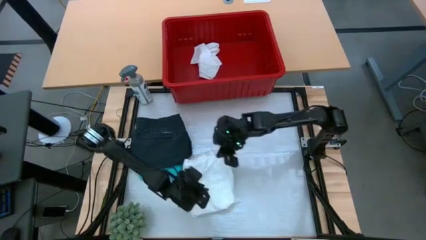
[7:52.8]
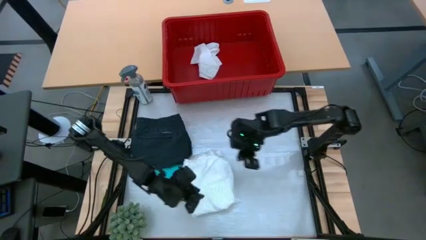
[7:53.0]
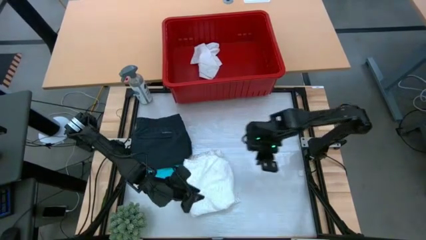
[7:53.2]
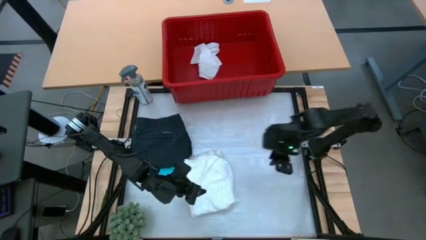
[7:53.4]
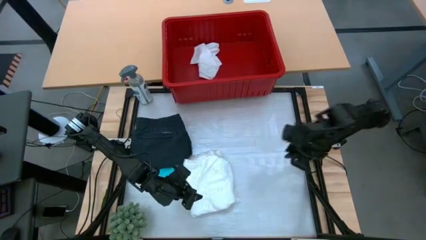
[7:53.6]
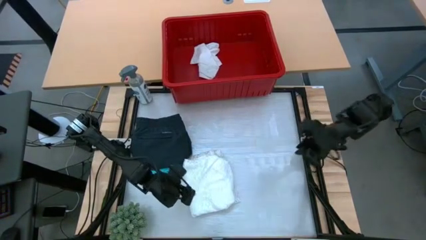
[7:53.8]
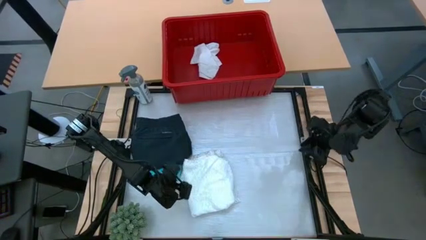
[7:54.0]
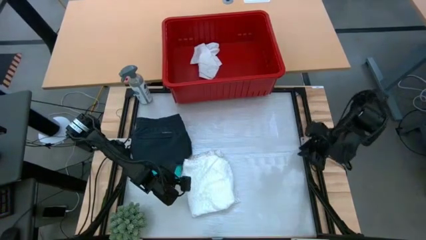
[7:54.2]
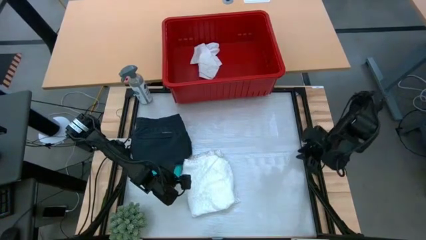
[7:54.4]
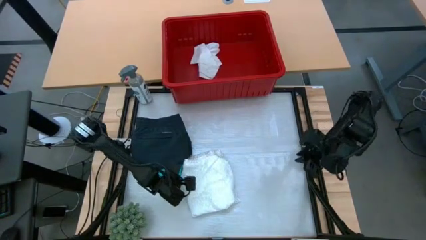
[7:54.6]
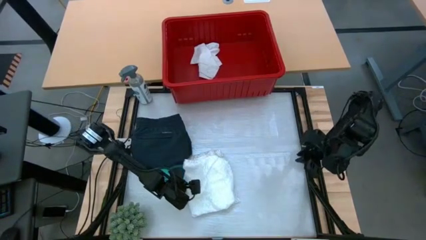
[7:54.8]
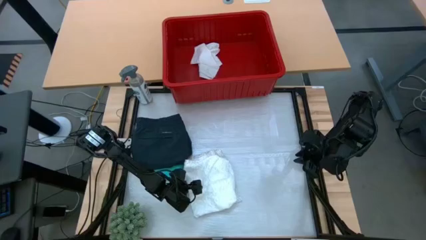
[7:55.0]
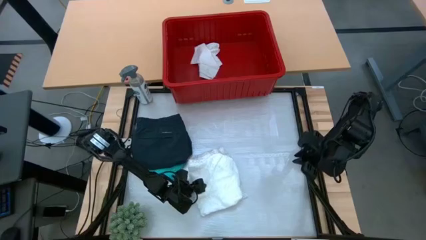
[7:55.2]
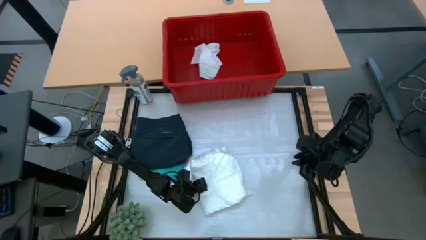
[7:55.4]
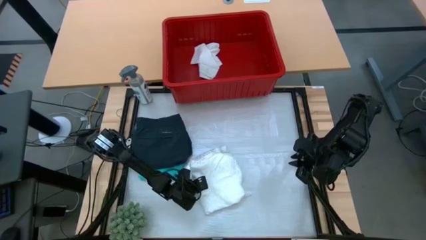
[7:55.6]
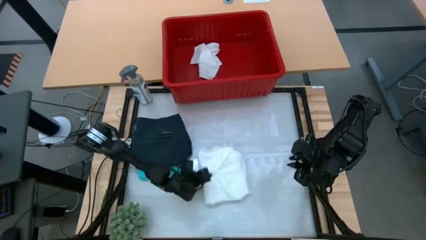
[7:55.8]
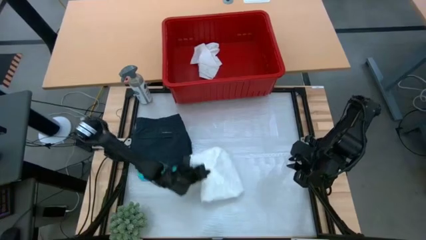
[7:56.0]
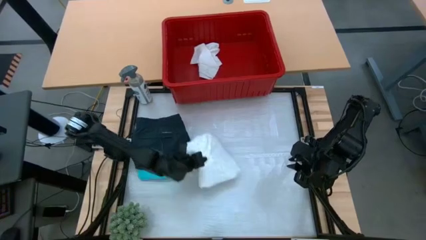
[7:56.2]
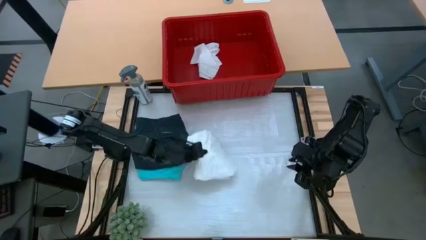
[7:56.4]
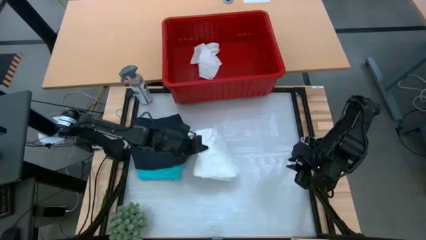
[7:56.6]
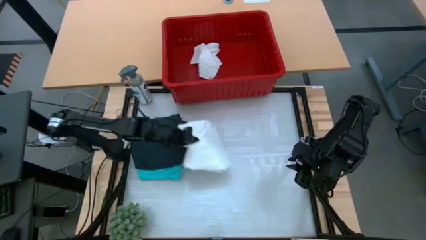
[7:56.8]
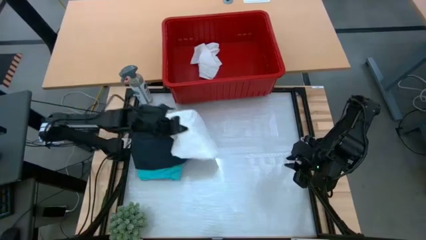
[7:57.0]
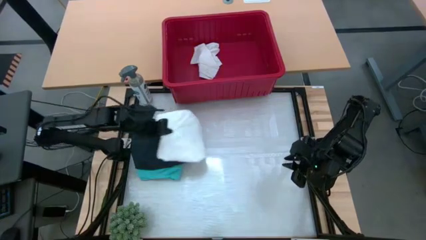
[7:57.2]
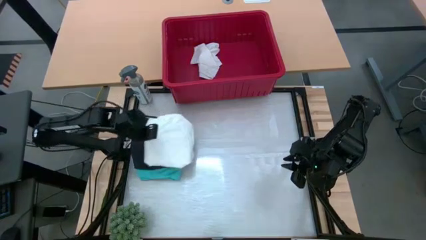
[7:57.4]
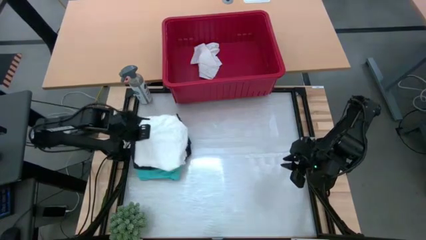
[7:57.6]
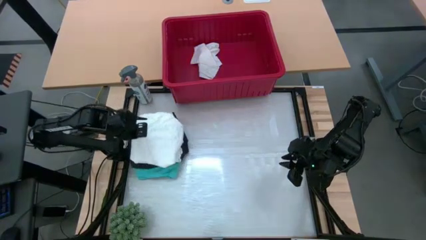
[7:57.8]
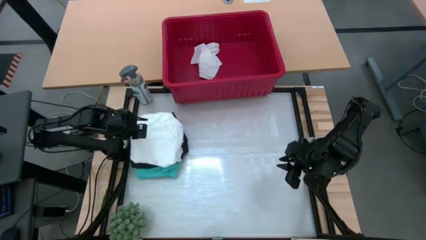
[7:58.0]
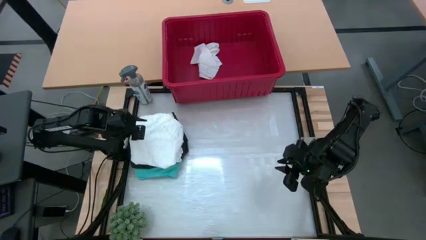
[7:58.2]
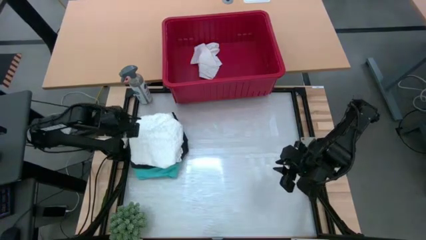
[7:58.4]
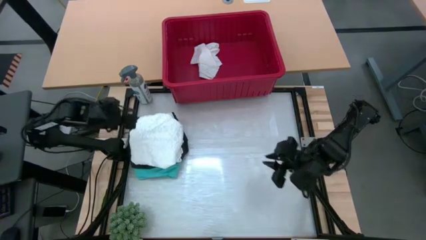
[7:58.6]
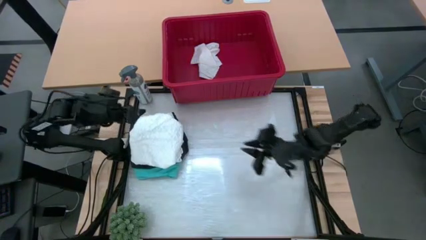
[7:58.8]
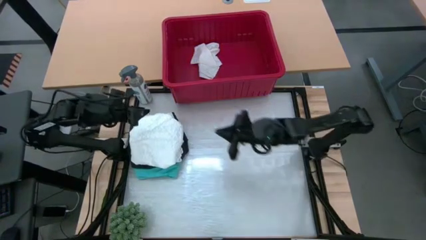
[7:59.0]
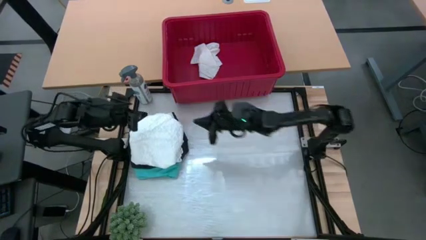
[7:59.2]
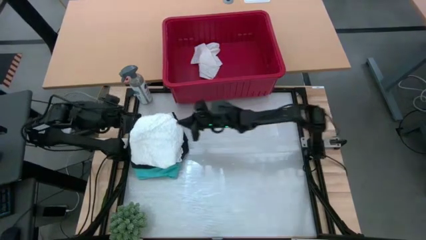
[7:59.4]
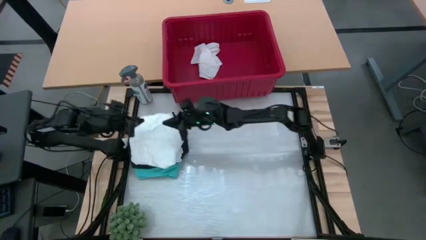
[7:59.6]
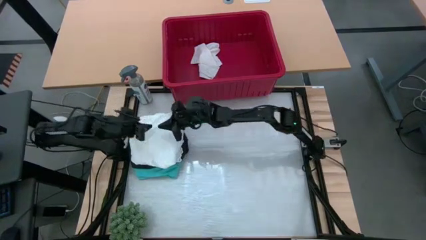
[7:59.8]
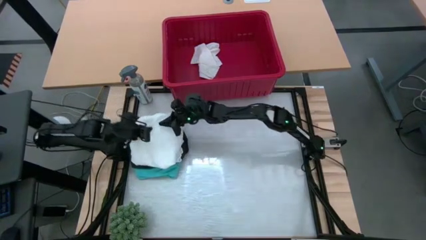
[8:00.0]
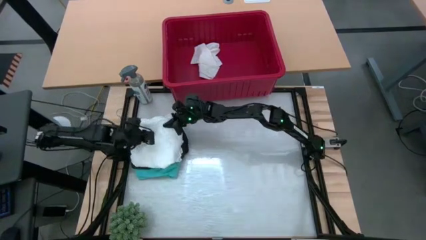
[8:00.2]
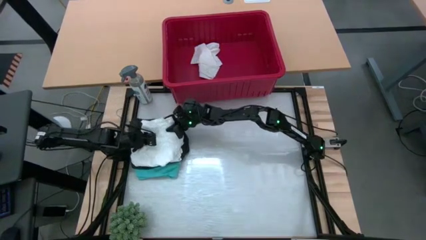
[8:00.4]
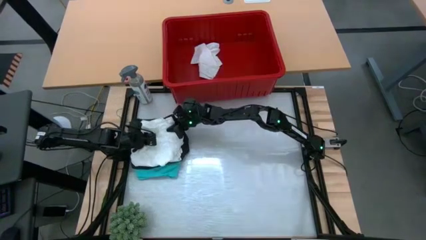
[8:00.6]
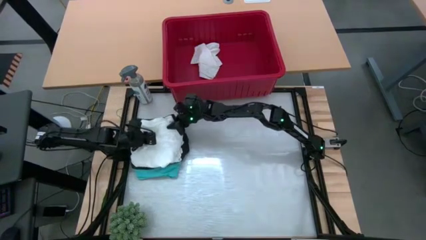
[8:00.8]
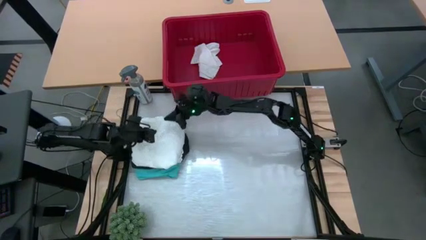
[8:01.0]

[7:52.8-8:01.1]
Task: Fold laundry
Stack the folded white dress on top of the folded black shorts

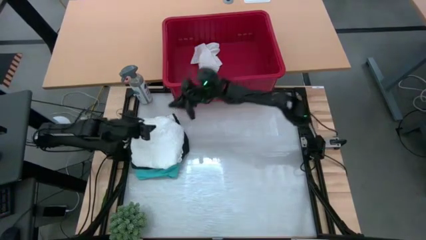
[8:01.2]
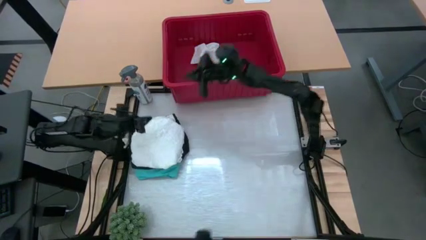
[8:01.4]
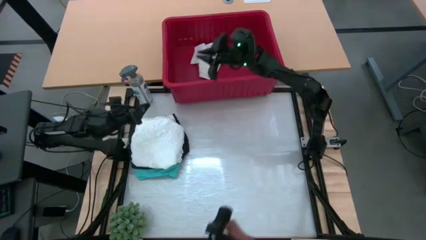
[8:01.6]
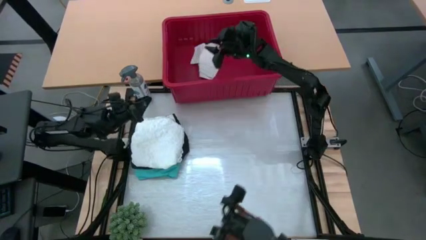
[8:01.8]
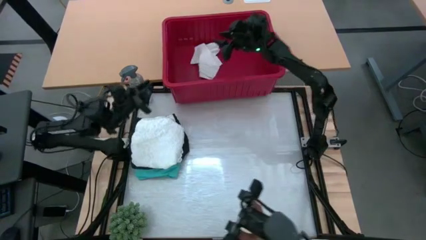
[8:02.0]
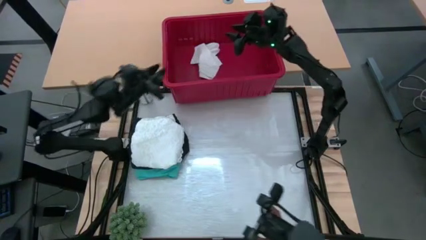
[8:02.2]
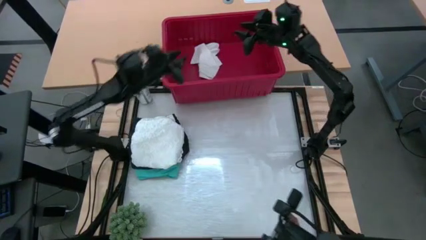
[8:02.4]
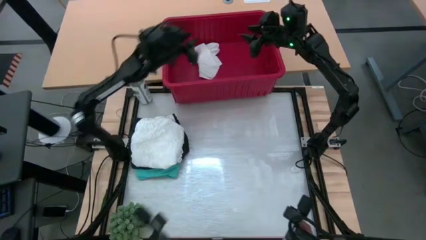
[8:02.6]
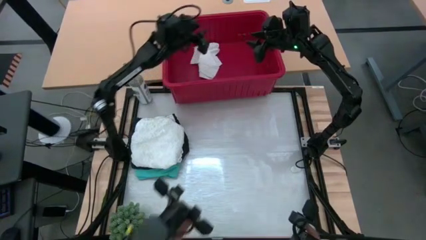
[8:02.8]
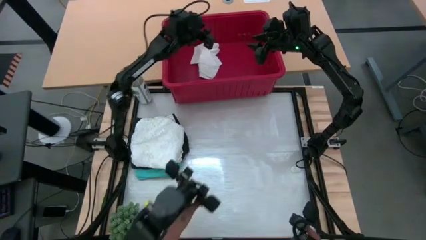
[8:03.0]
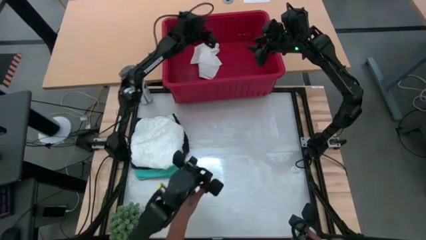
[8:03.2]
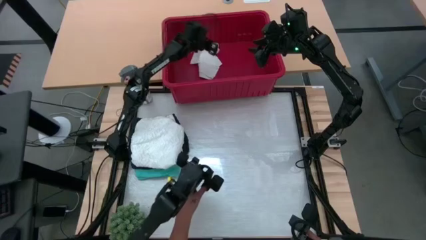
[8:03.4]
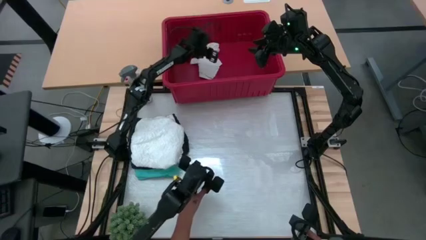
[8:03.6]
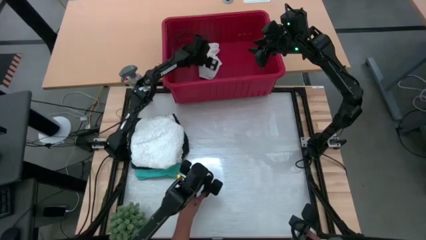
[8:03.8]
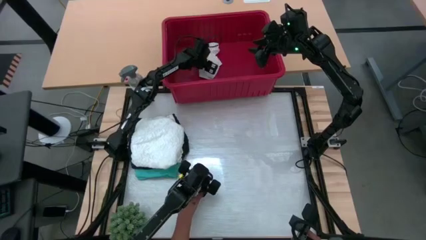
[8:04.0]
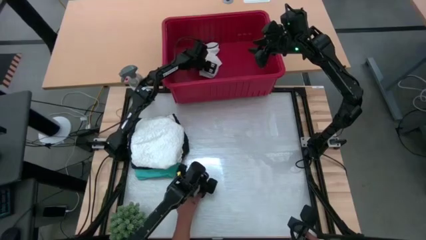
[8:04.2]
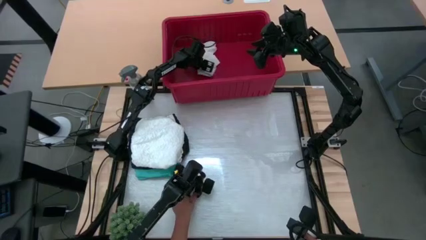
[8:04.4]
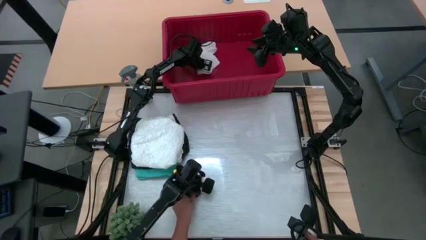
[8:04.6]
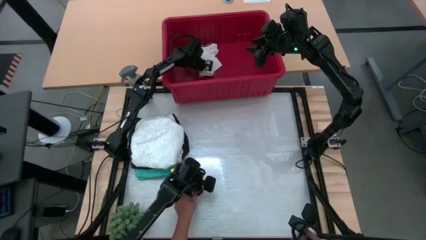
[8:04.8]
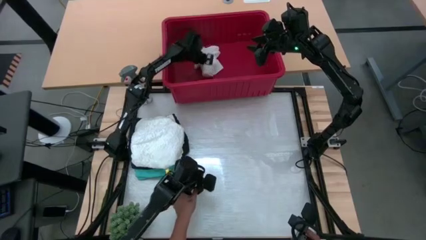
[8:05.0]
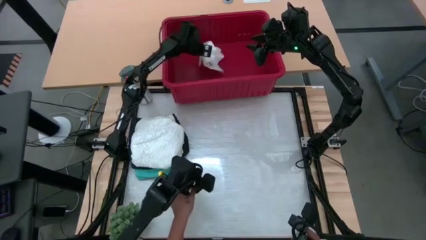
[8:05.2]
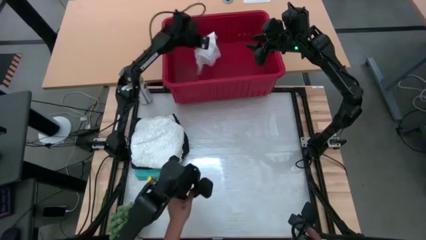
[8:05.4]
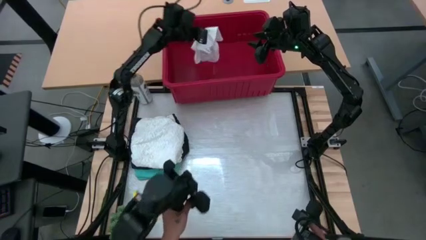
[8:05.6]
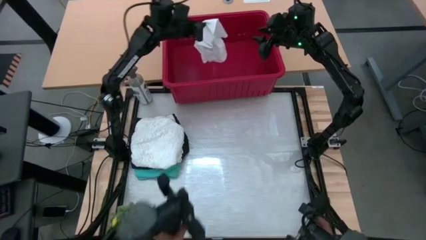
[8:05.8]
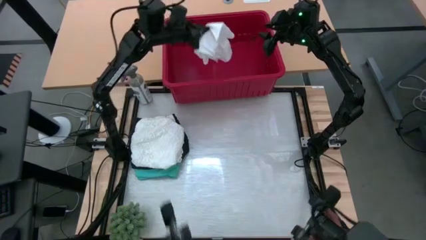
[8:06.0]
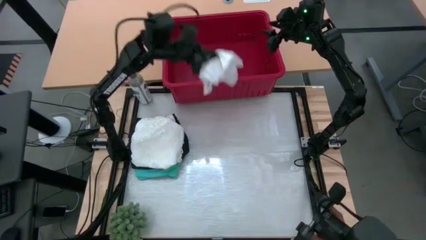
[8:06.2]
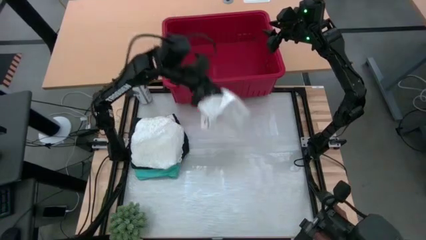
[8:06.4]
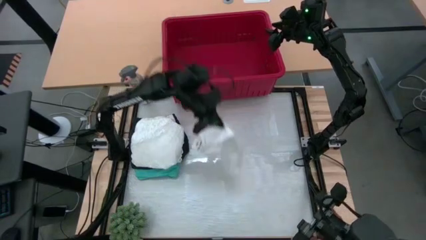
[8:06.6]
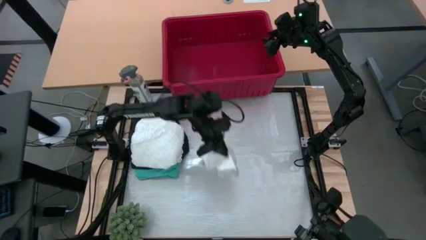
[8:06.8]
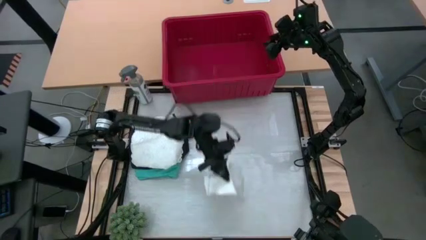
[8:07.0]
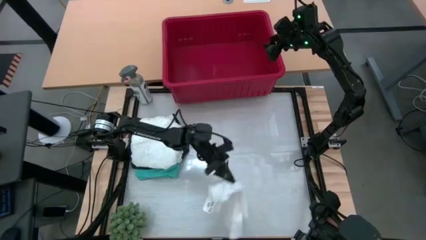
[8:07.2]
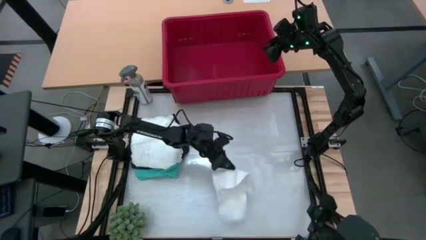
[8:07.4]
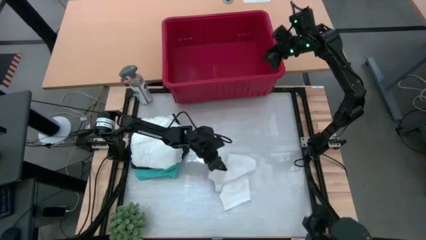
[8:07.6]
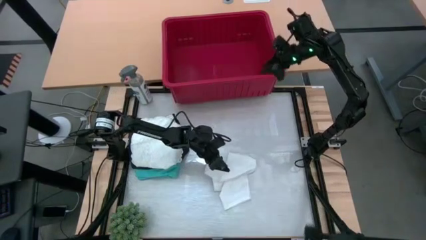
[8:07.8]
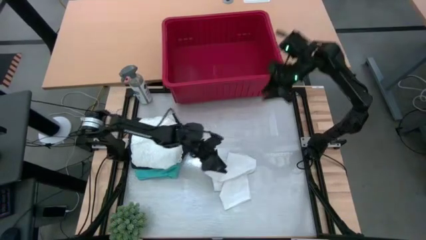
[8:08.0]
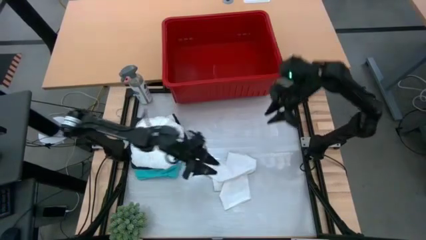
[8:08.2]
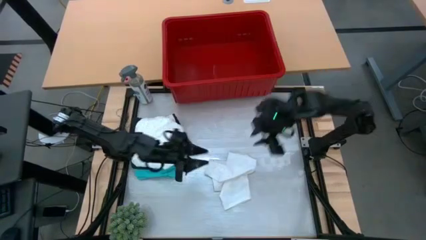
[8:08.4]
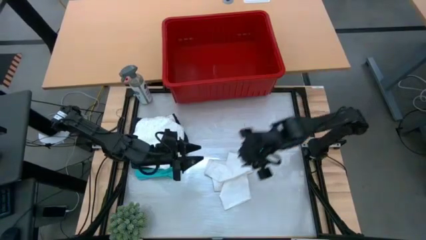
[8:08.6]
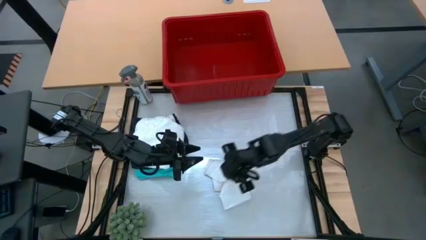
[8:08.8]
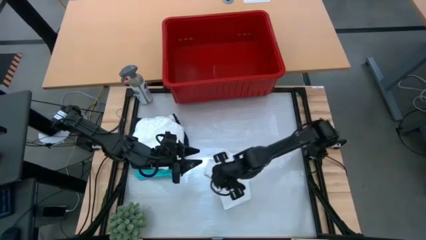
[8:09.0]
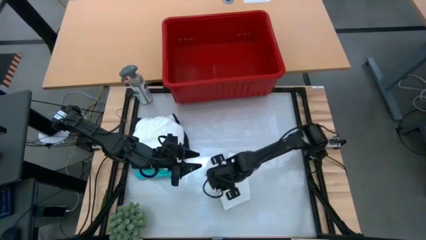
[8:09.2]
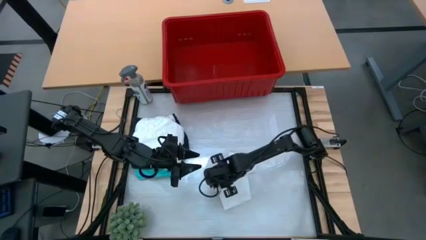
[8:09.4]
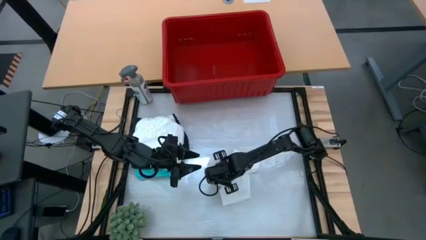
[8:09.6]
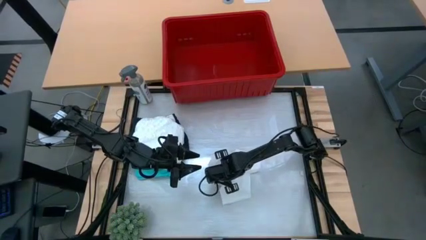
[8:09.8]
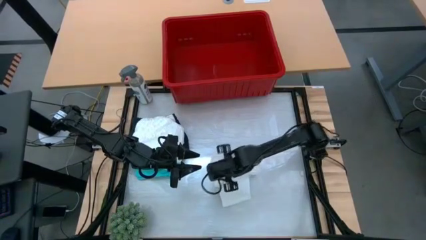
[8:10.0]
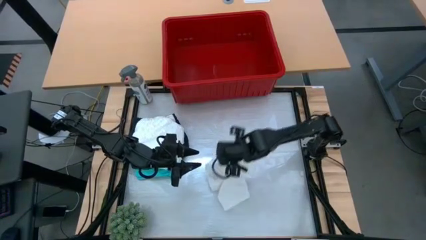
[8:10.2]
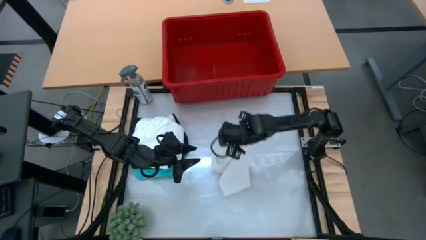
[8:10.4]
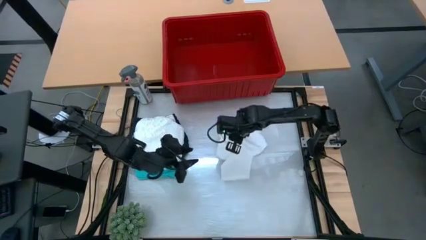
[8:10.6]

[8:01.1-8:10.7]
Fold the white shorts
